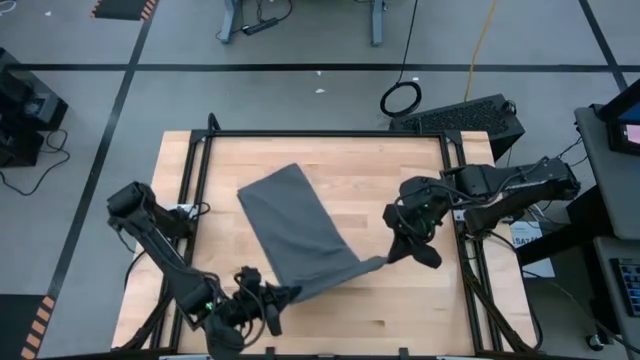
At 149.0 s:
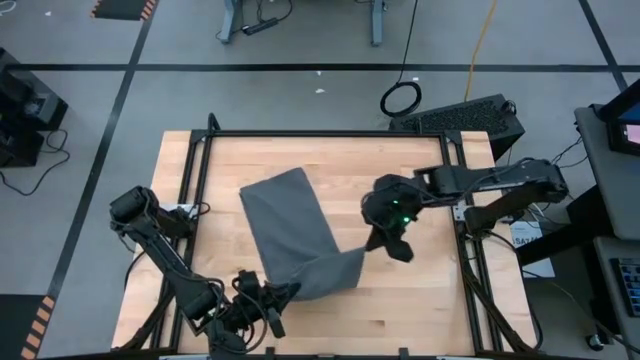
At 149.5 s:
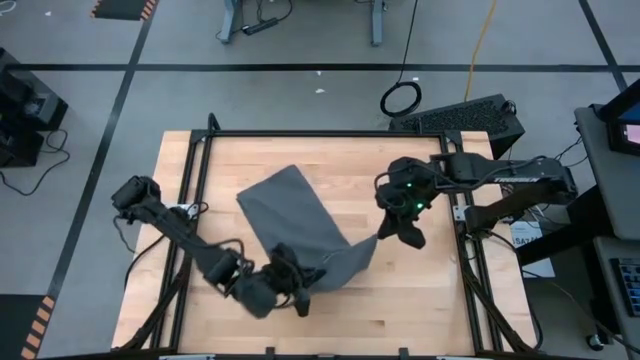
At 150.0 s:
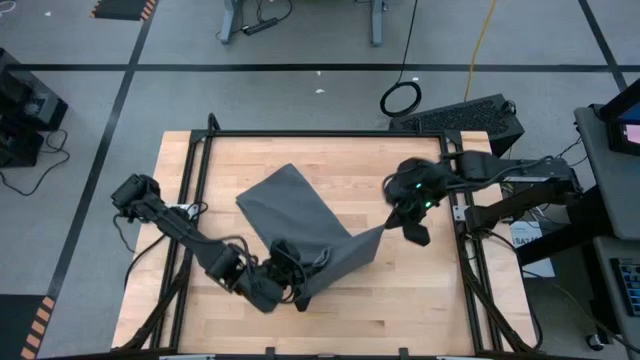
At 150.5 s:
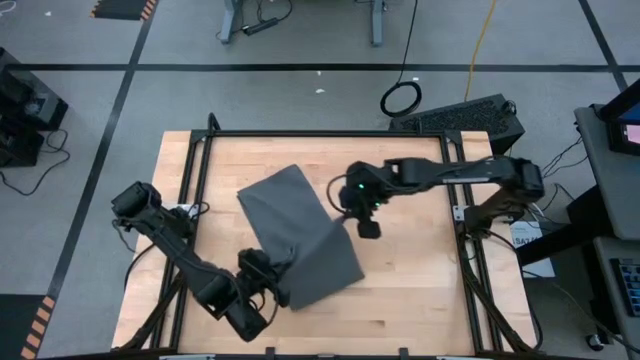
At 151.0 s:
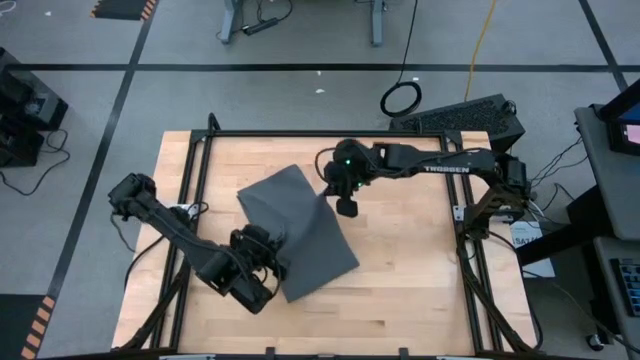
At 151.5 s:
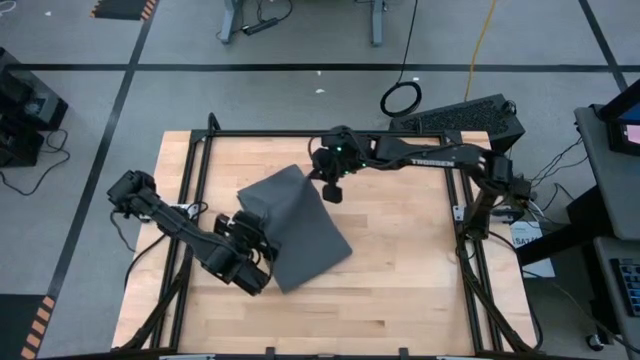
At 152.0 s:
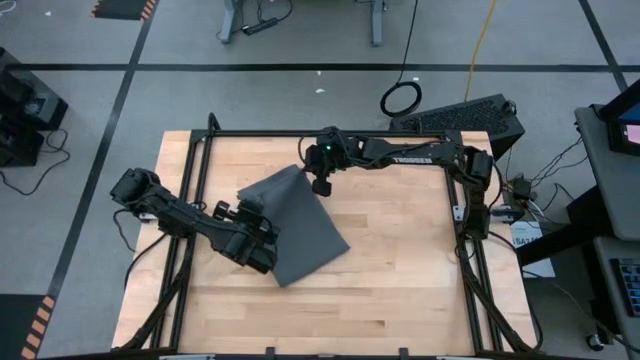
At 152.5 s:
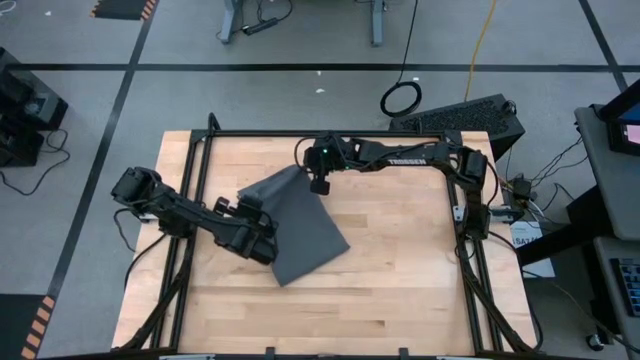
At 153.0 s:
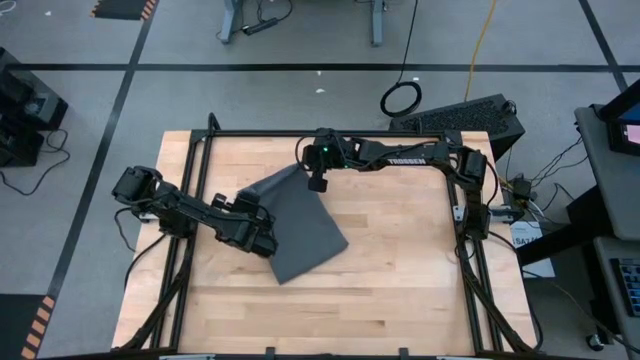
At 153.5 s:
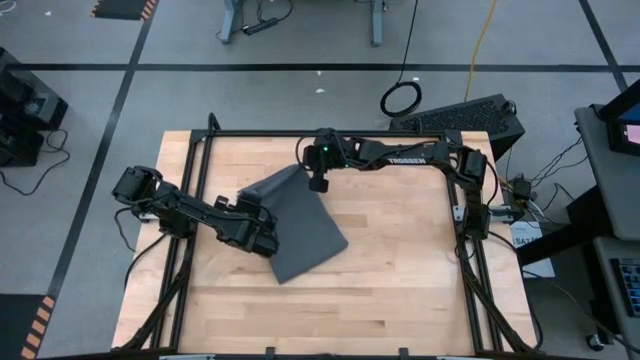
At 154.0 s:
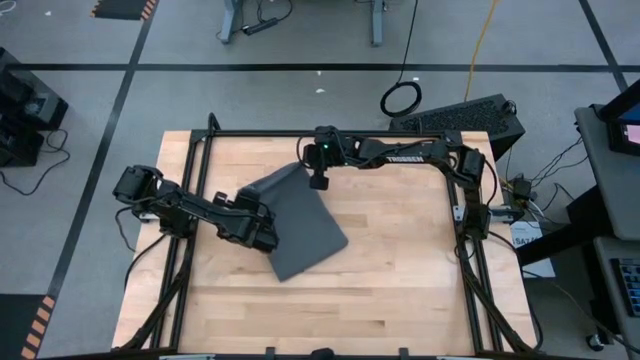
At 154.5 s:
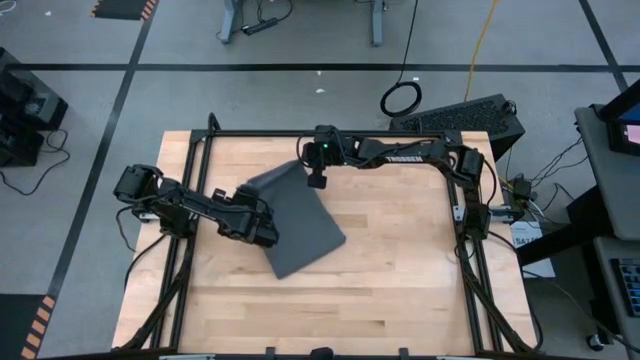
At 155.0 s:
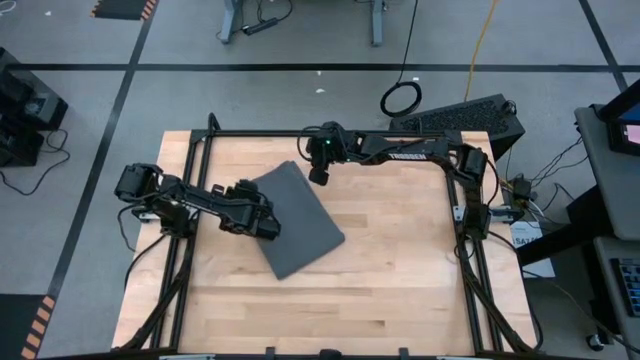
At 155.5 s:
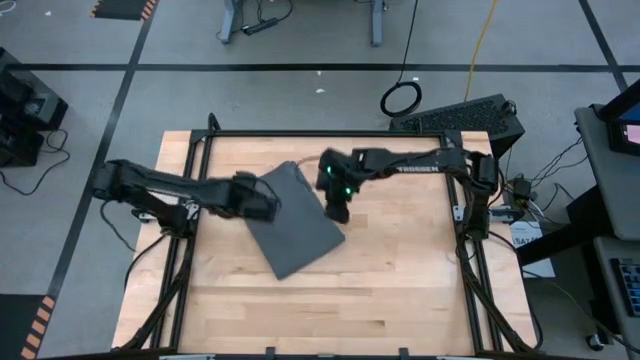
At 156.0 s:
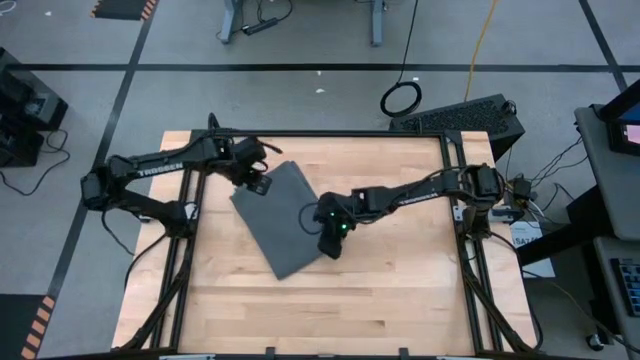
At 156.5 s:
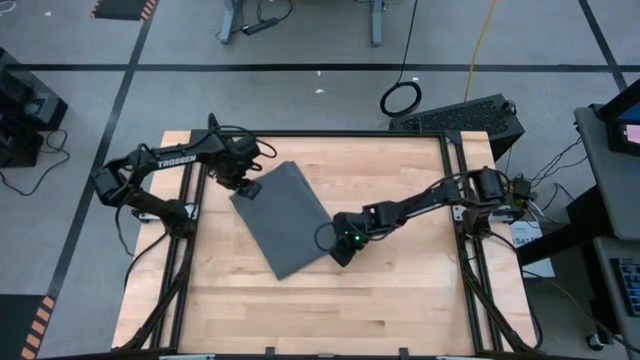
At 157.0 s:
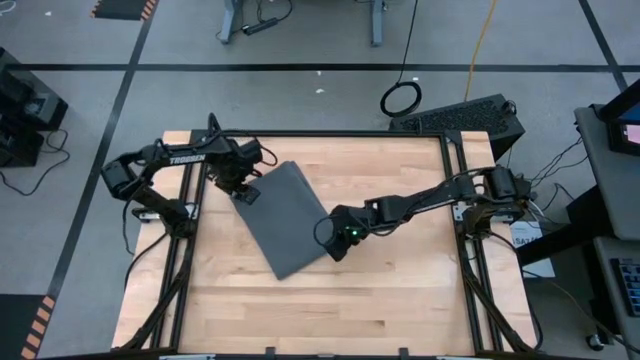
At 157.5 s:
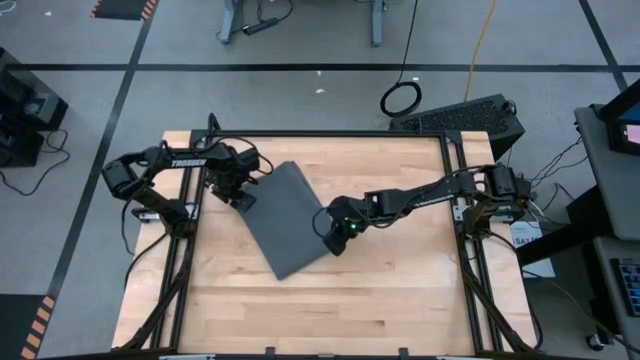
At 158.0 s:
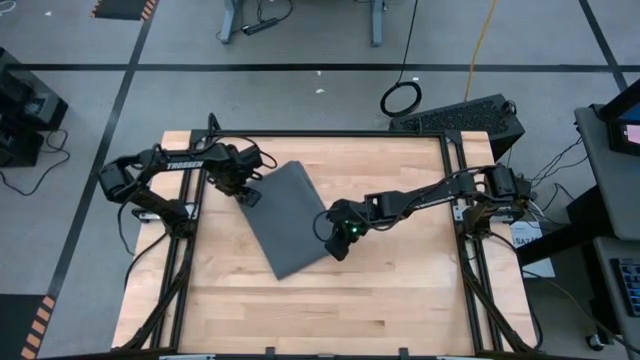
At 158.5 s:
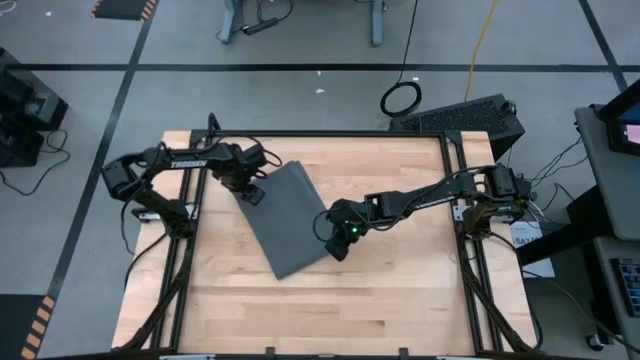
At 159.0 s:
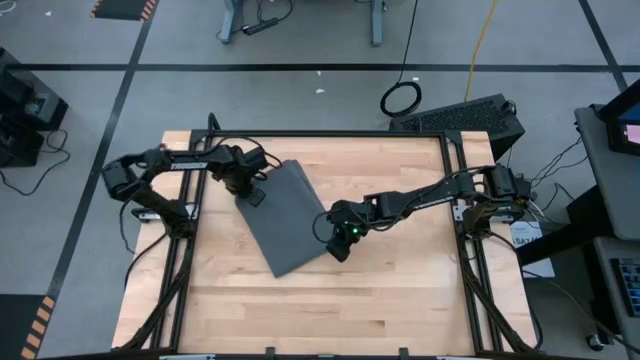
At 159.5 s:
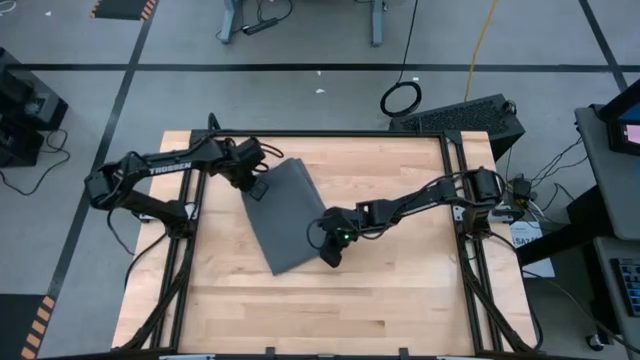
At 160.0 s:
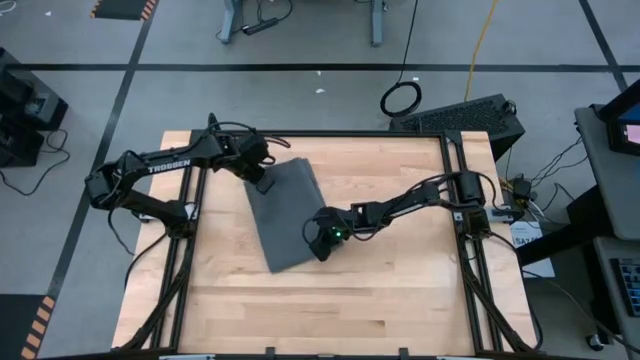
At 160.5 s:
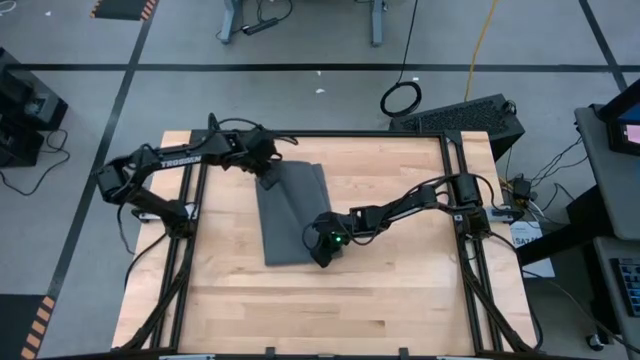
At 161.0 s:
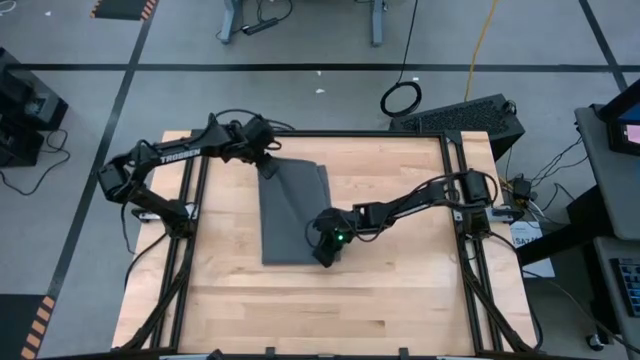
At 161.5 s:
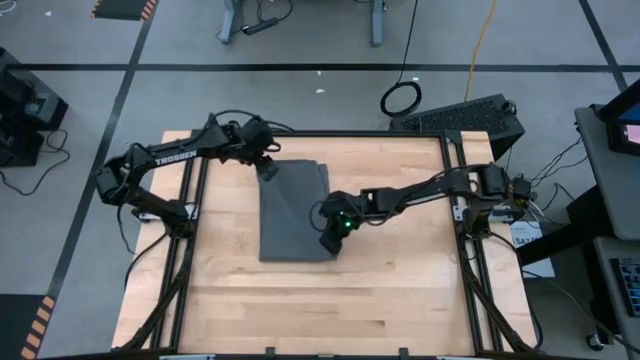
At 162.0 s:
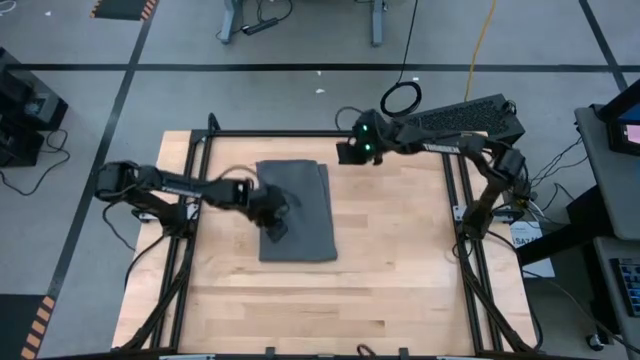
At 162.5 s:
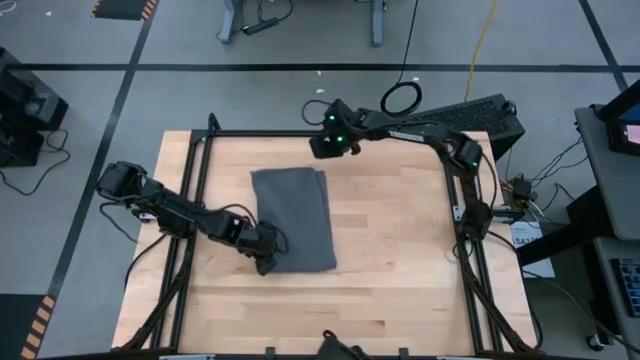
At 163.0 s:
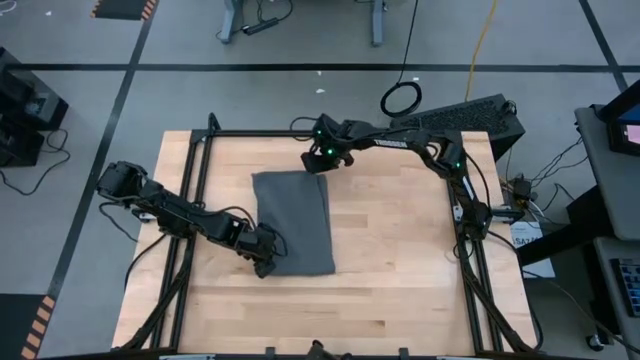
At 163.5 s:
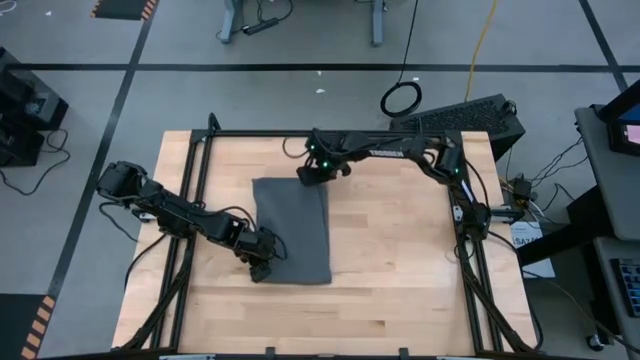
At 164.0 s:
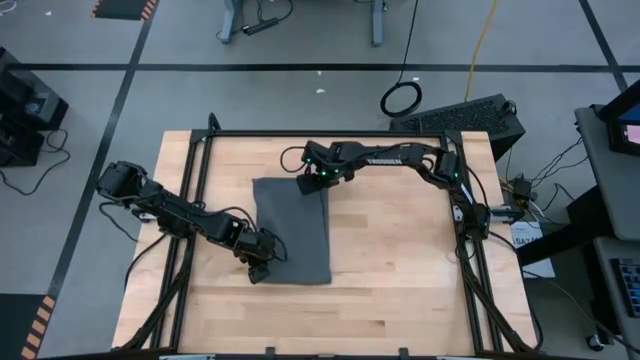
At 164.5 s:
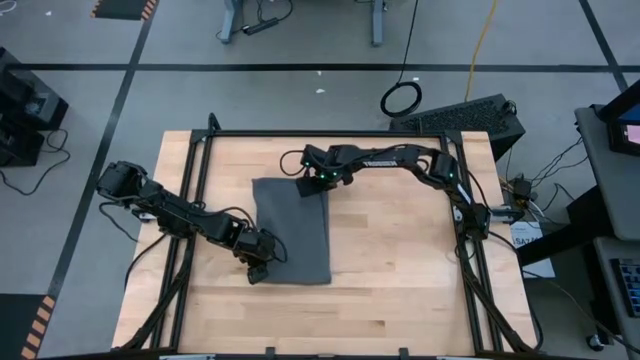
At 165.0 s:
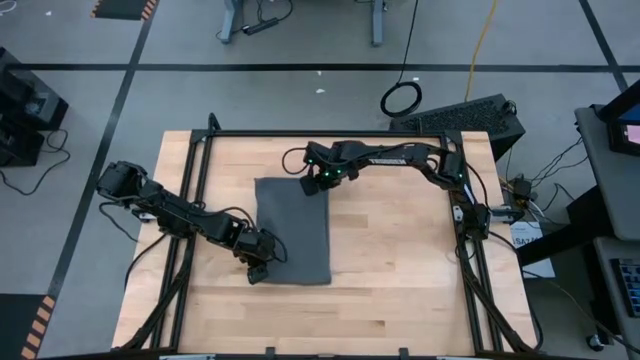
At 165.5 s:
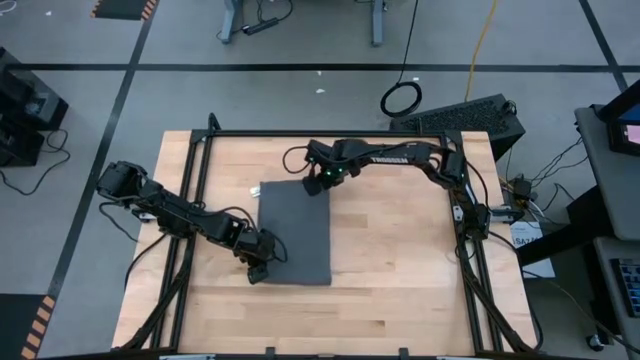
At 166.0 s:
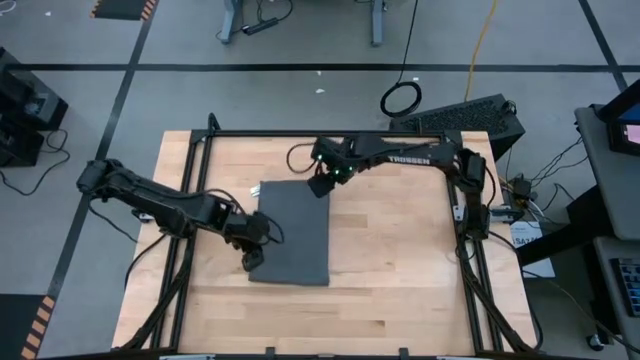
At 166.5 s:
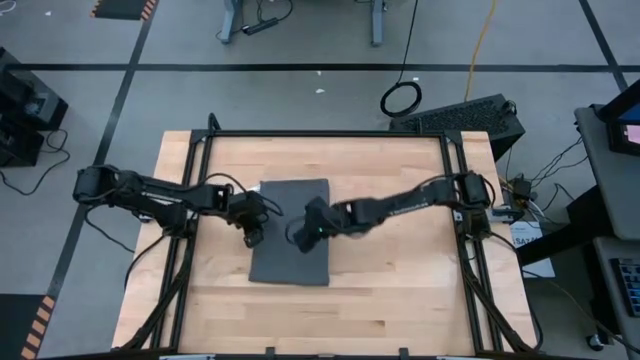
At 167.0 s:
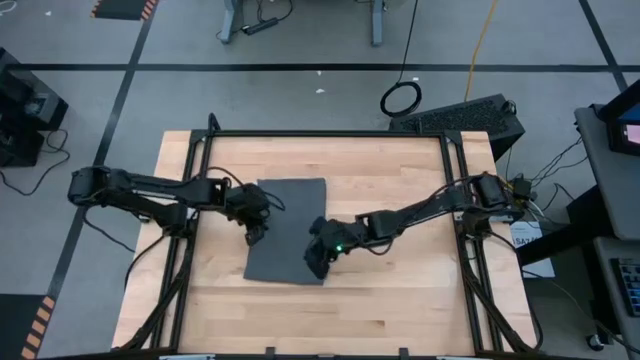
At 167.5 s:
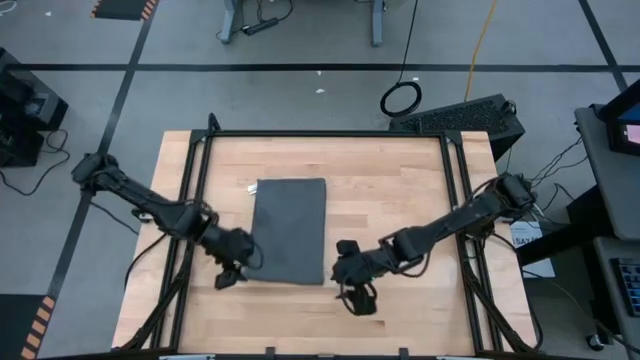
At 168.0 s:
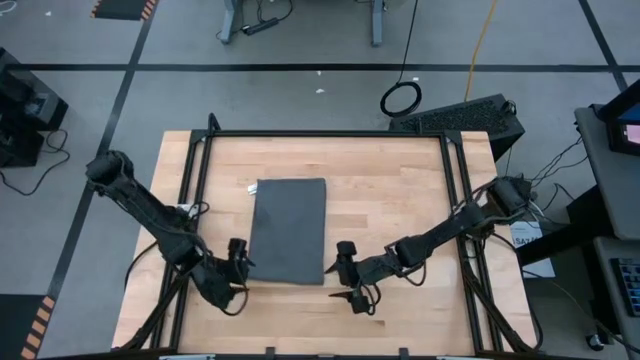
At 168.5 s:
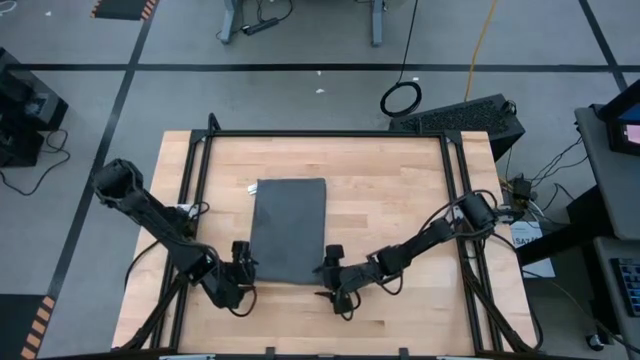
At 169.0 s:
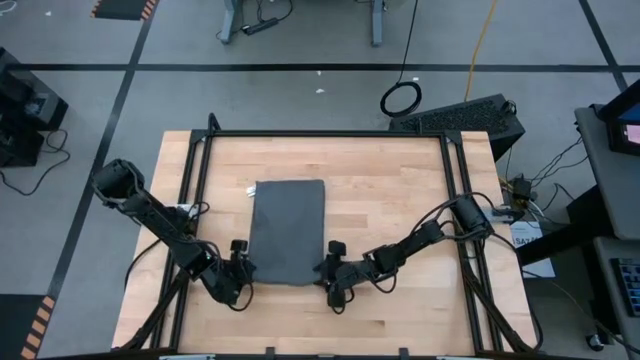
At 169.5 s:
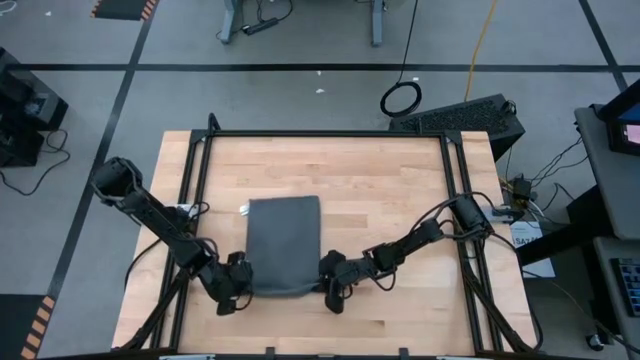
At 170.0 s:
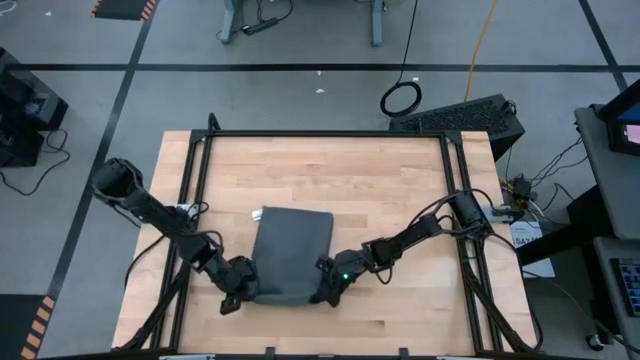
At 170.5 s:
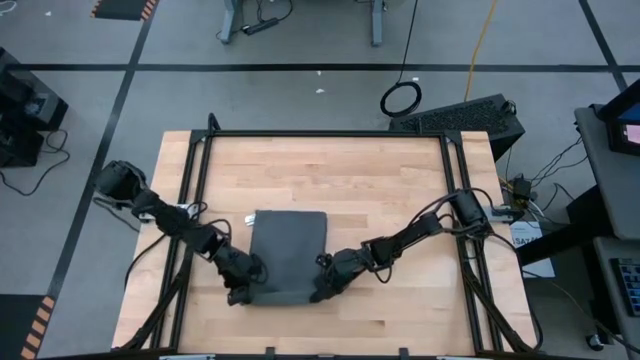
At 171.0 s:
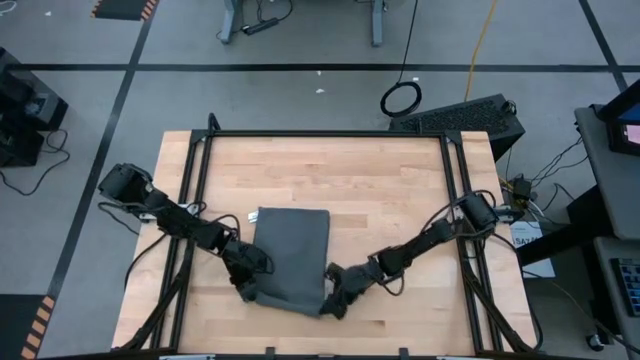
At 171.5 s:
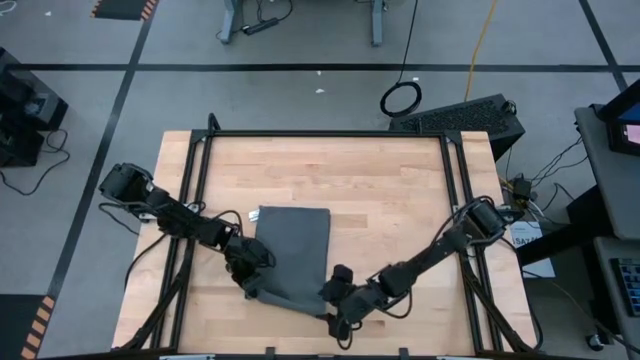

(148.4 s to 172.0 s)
Task: Roll towel into tight, uniform cylinder
Roll the gray towel
